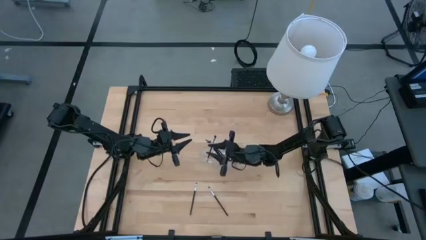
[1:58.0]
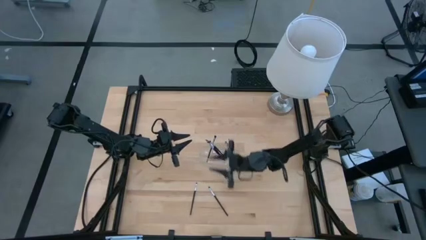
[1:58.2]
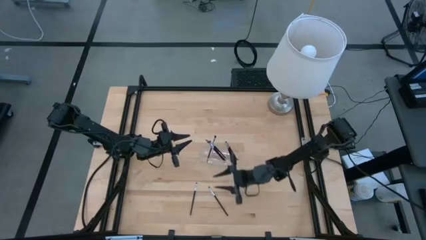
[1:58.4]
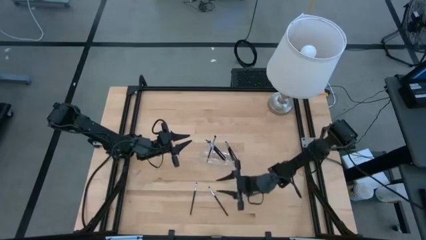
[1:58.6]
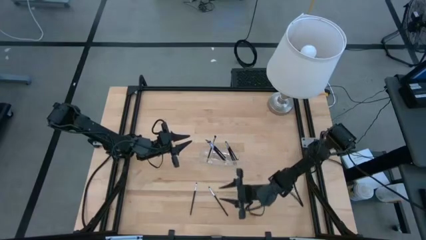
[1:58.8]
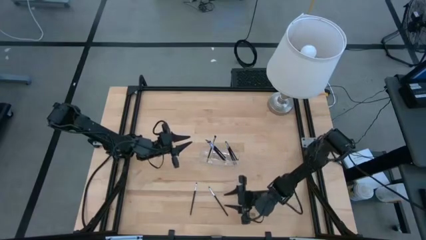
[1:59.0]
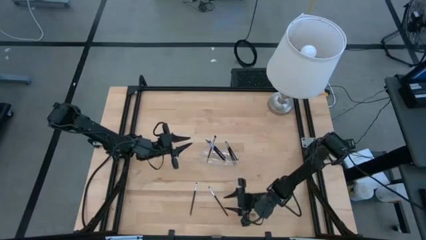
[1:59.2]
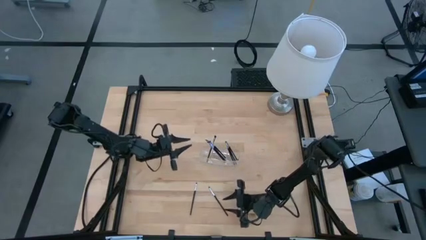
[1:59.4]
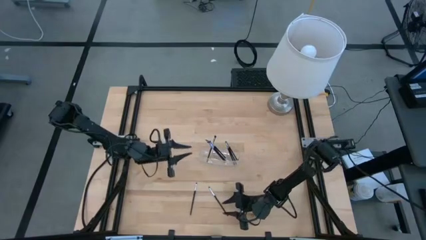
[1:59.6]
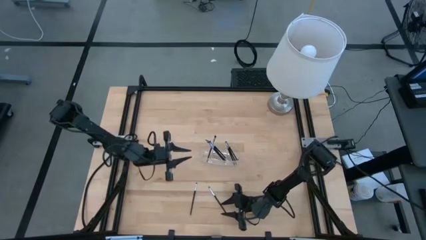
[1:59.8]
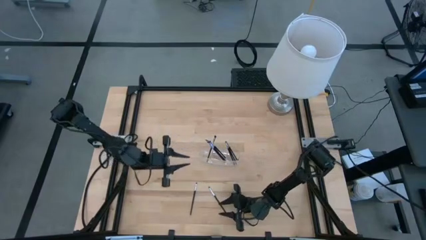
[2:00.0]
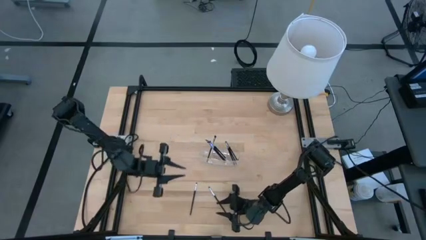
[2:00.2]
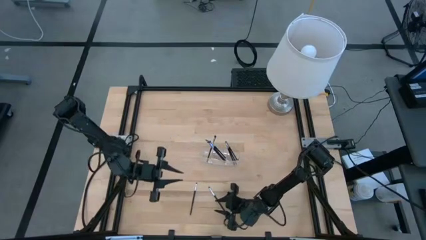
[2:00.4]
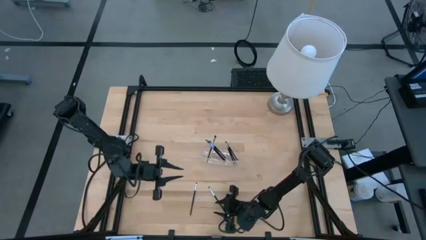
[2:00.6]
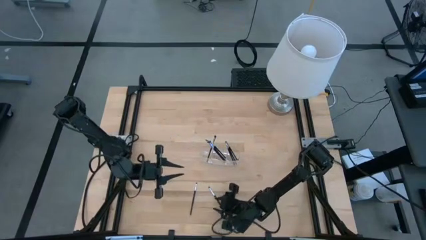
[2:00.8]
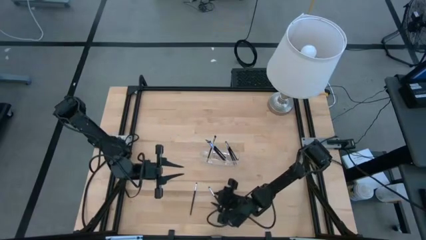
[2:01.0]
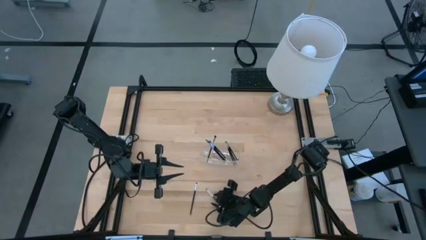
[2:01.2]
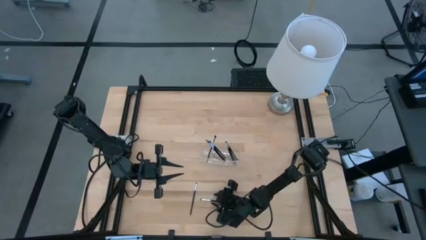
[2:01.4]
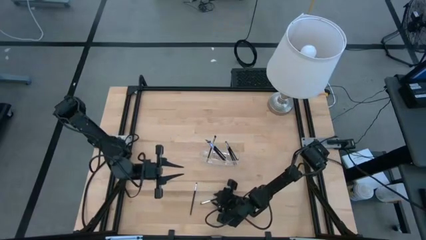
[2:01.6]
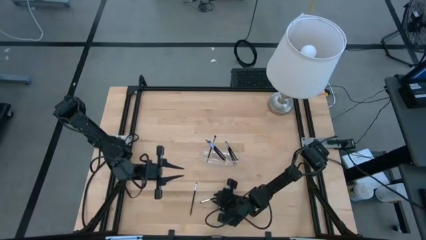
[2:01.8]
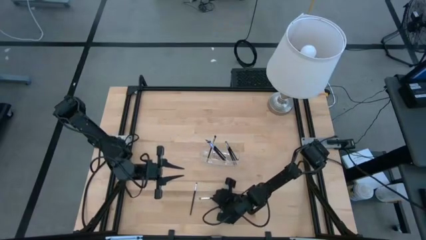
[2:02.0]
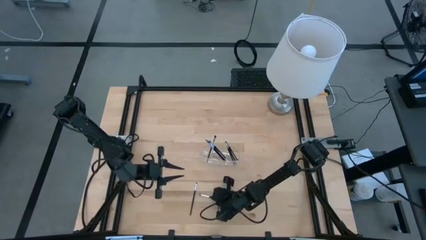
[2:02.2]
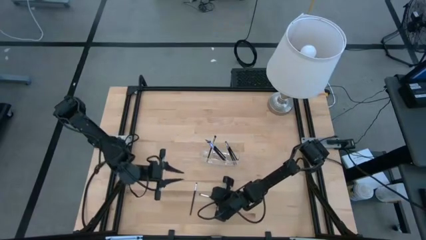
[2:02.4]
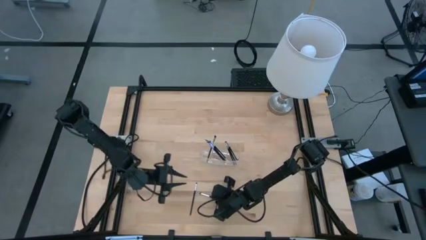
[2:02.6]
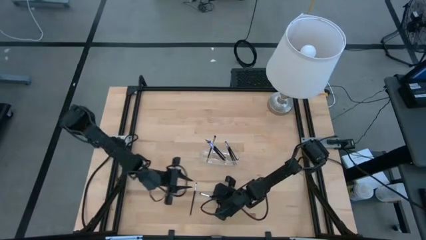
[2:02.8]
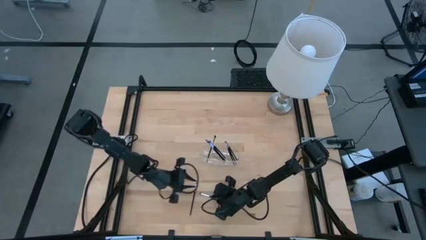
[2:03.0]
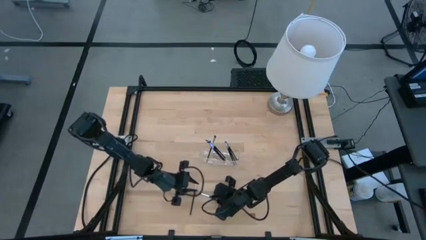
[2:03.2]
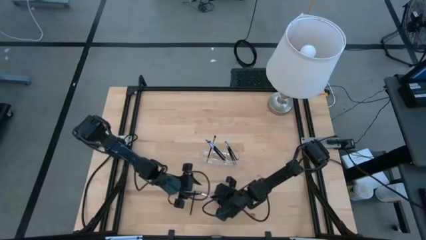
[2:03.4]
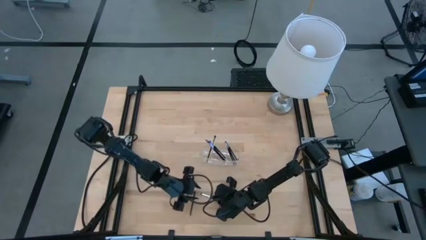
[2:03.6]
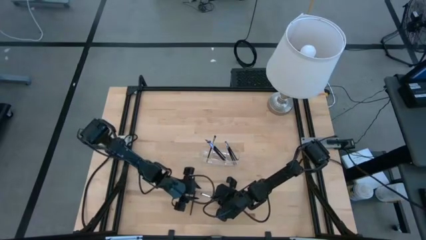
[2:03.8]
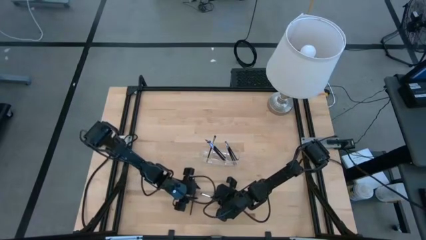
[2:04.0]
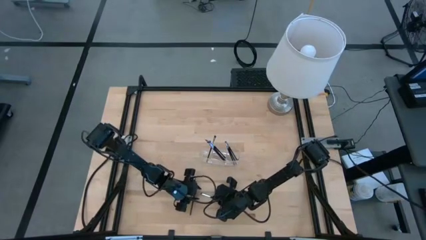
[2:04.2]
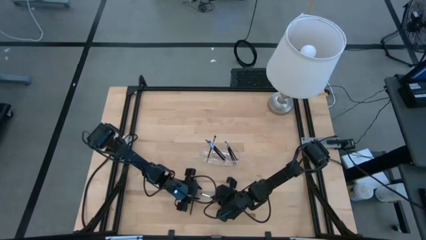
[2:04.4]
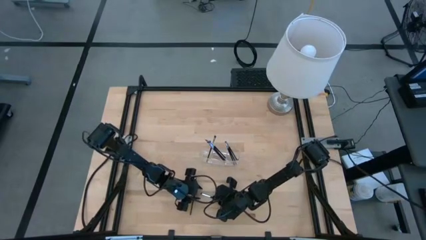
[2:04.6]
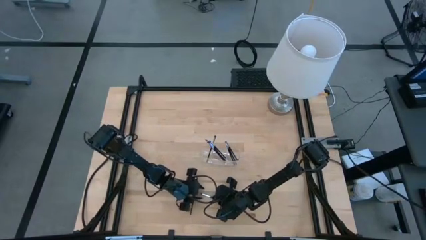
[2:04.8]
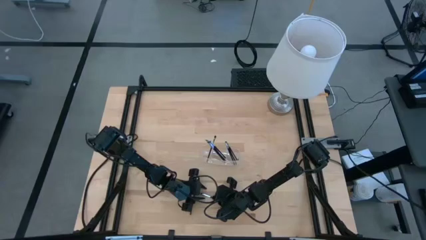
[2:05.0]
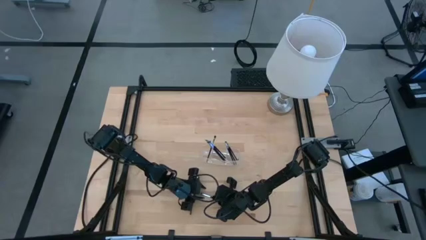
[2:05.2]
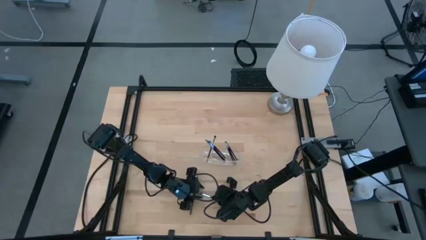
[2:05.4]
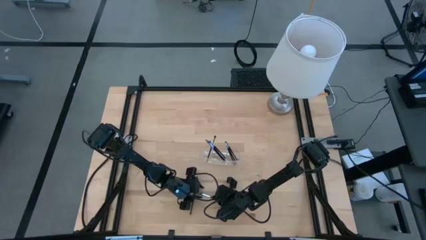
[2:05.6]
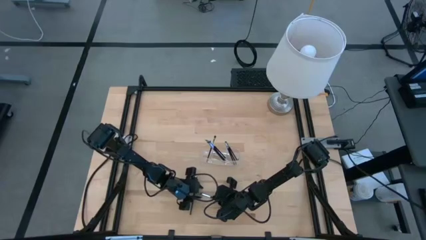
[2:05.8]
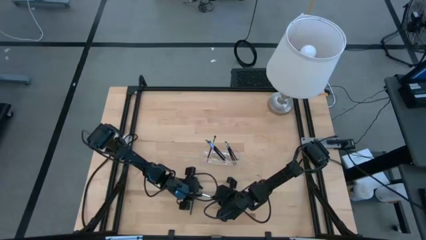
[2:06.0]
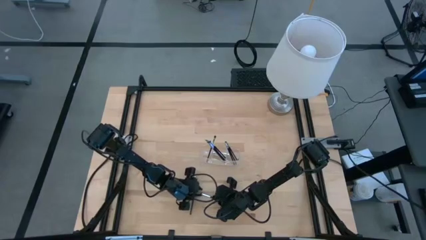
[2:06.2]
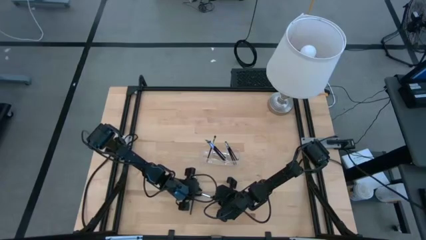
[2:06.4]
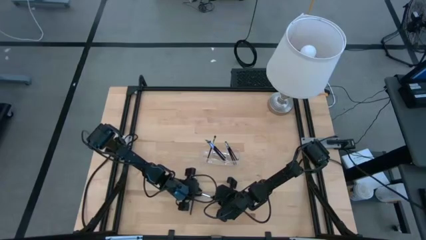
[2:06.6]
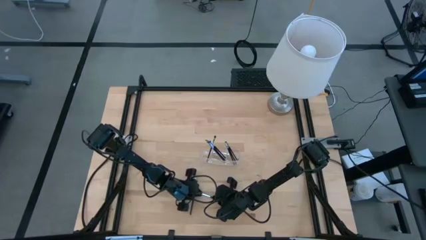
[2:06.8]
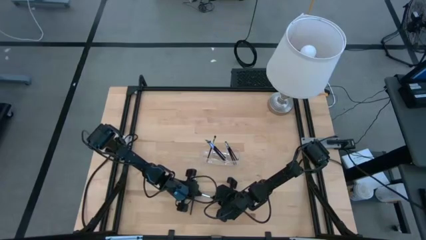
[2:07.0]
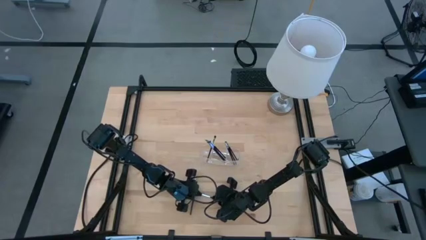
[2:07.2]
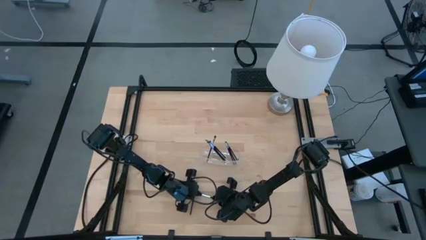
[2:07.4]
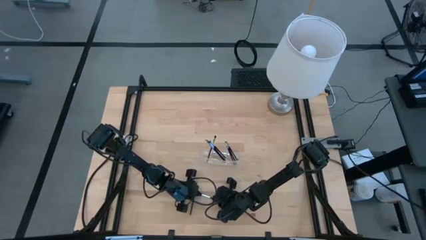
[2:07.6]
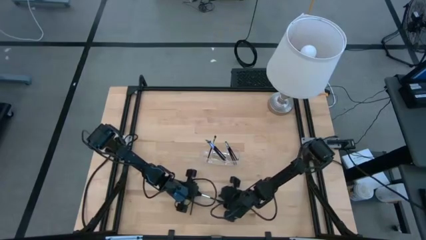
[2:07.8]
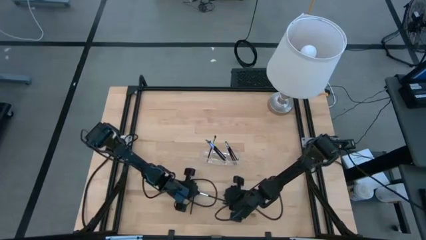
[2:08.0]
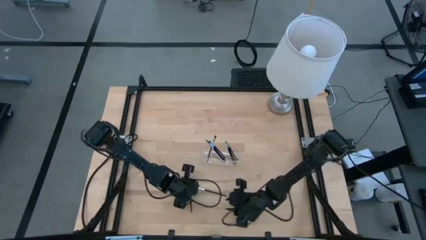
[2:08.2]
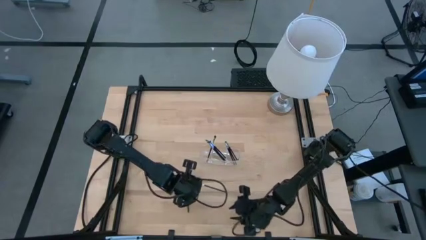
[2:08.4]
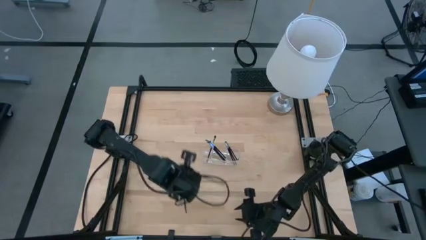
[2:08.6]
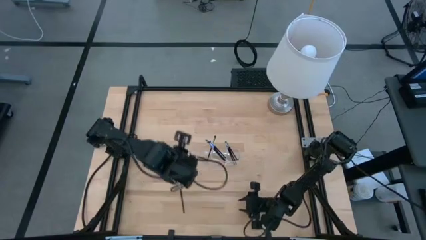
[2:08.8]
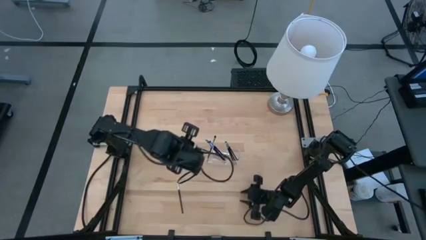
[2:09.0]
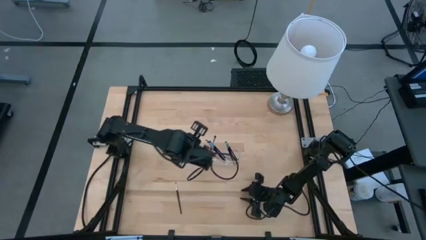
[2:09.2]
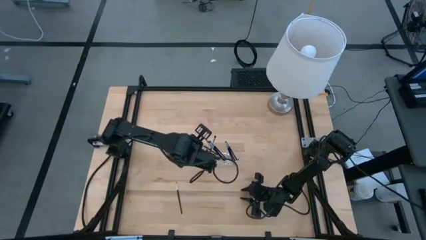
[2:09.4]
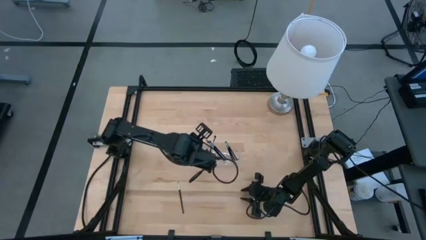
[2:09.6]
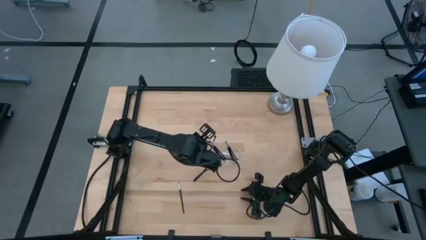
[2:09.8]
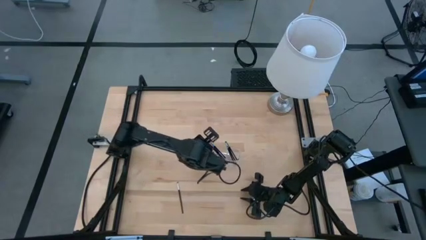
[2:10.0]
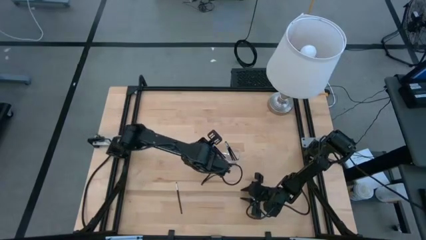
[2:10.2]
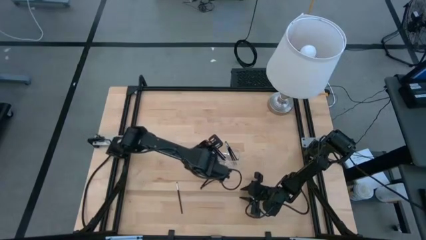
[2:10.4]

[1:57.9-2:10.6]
Task: Put items in baskets/containers
Put the eyeshadow brush in the transparent organizer

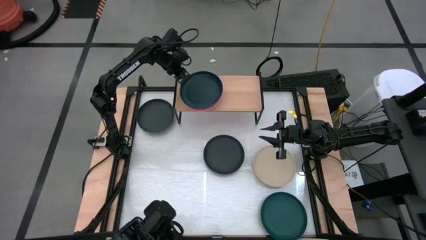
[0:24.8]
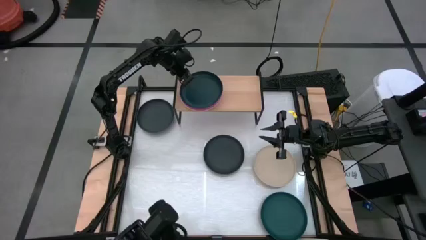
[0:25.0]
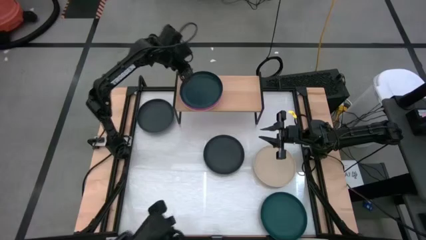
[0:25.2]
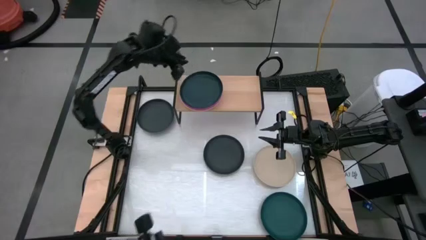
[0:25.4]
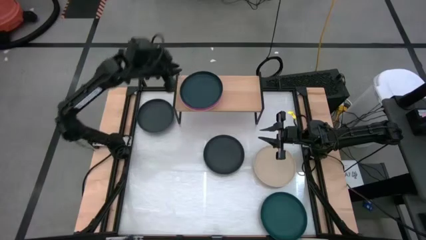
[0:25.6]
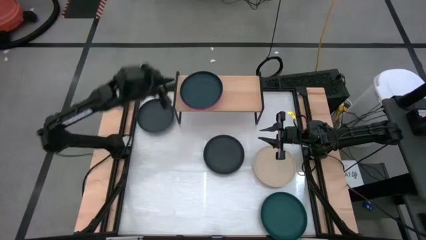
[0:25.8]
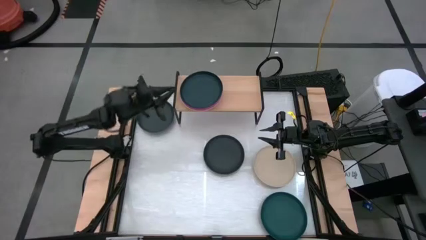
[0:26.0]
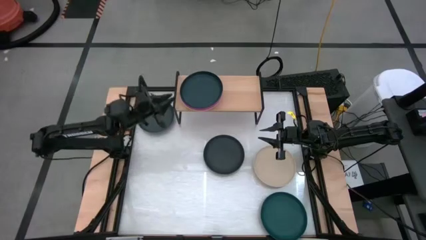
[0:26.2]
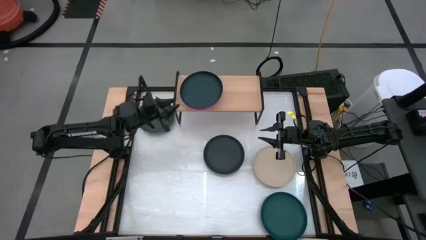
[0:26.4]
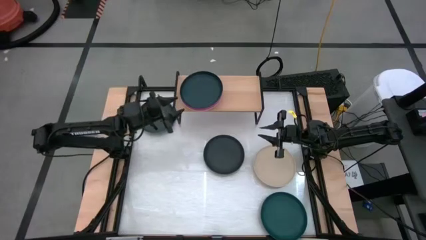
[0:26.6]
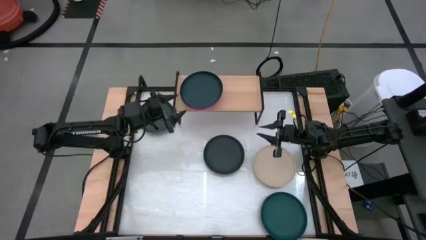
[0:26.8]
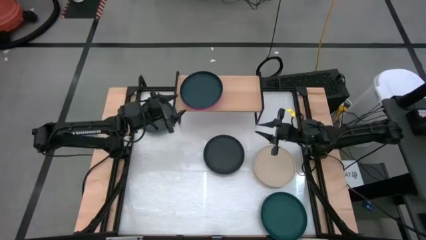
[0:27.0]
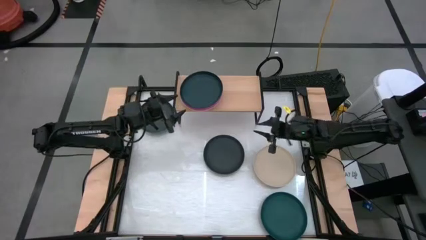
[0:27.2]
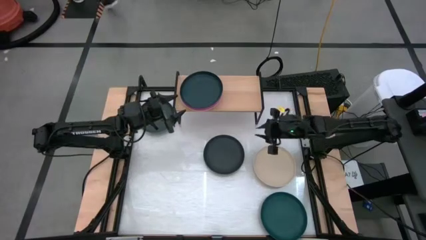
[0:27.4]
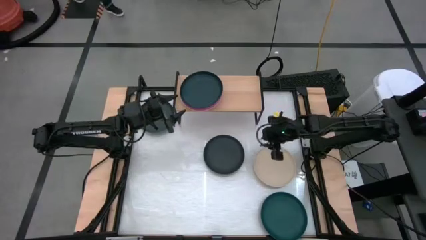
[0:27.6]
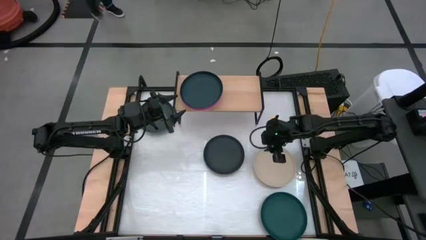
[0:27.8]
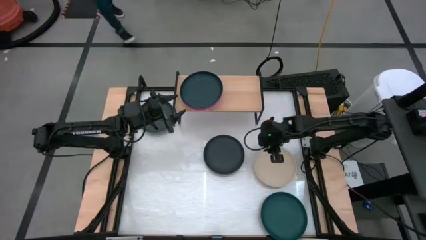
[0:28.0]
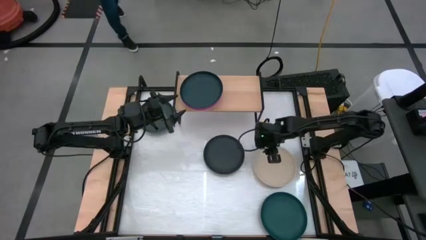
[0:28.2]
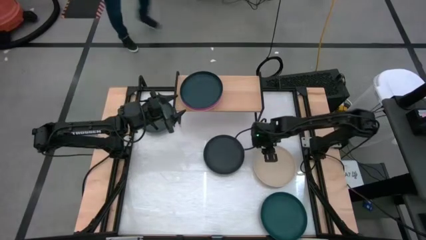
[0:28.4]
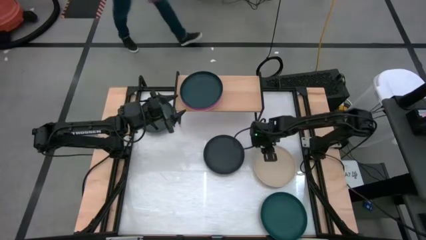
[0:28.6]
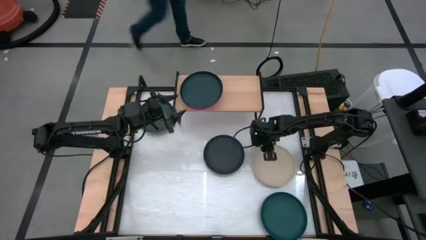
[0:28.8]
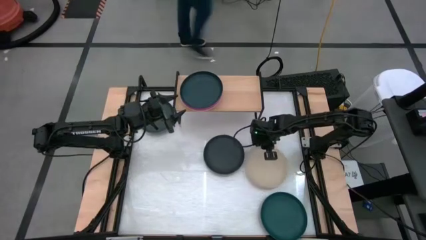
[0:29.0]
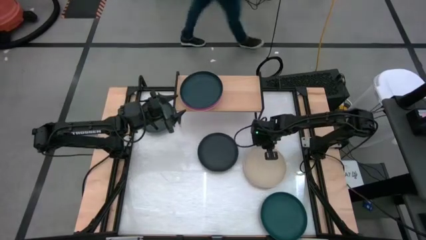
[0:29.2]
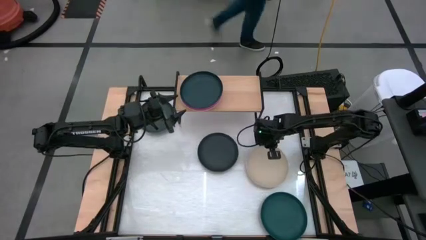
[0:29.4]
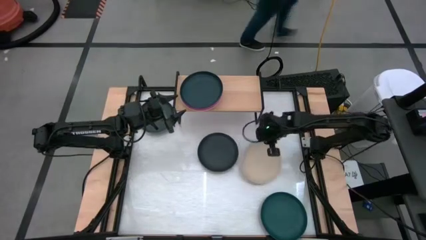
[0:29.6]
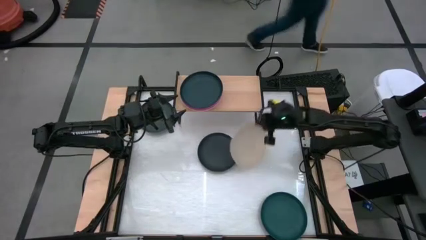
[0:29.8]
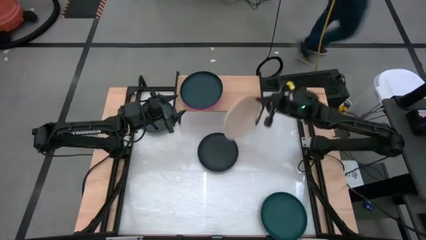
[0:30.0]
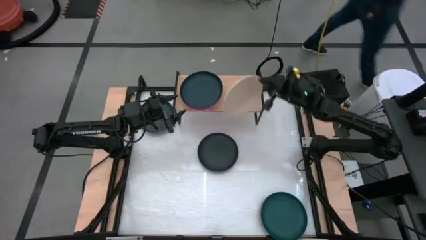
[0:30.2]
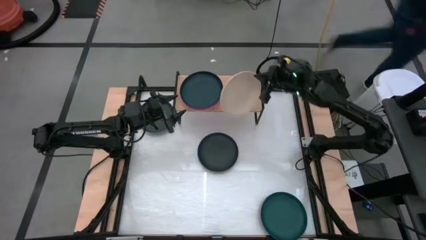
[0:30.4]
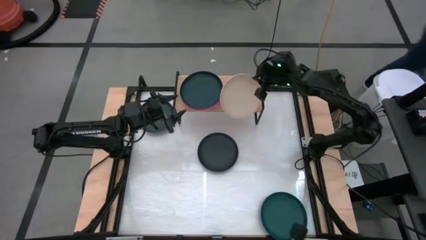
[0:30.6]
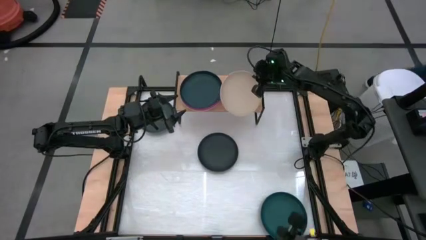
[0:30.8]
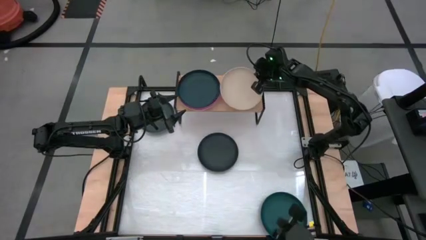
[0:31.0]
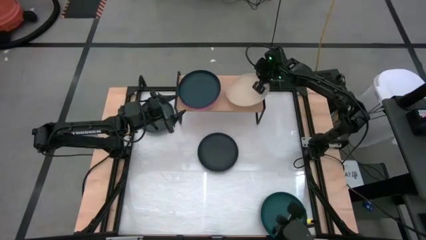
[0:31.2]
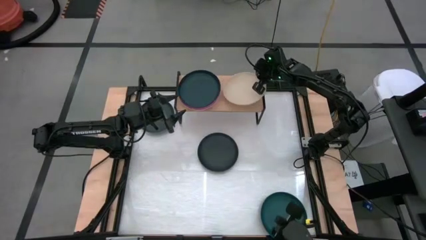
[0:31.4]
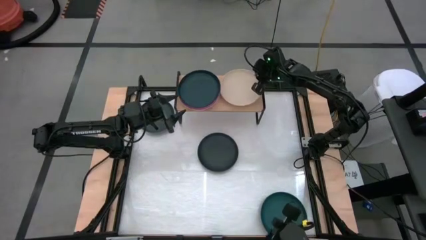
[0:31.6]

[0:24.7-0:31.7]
Task: Place and stack plates onto a shelf
Put the gray plate on the shelf
